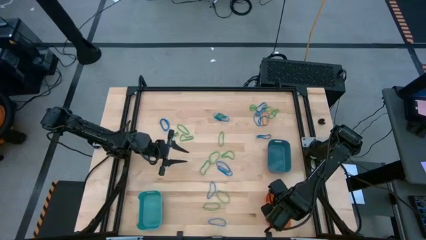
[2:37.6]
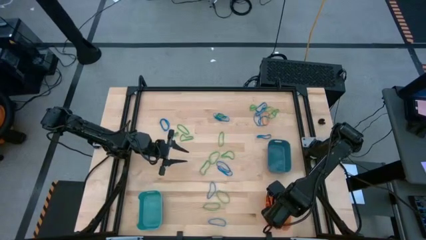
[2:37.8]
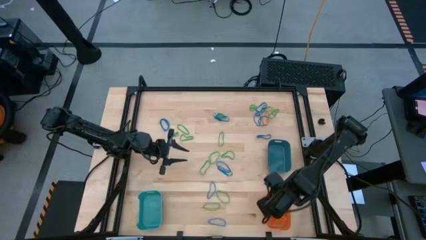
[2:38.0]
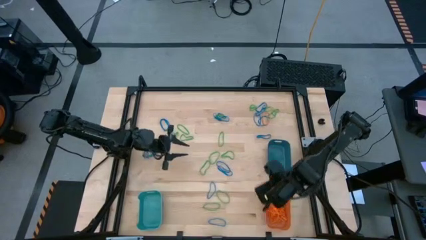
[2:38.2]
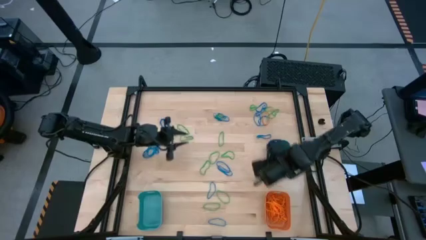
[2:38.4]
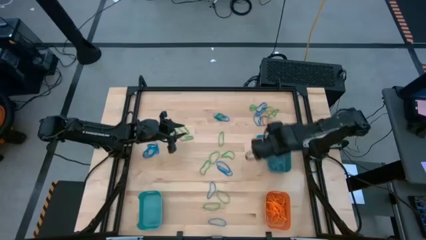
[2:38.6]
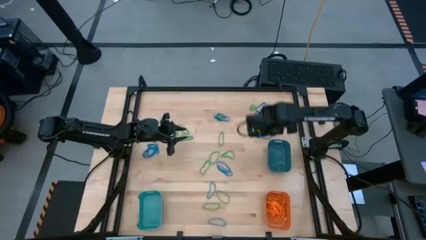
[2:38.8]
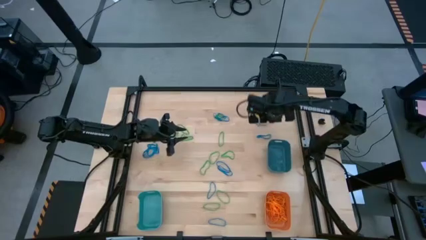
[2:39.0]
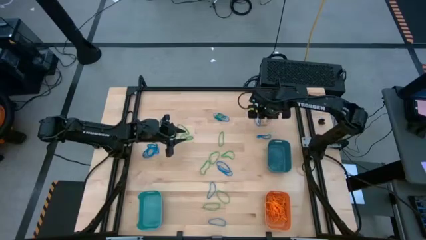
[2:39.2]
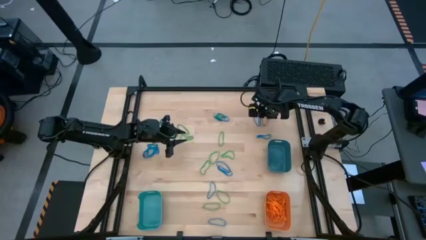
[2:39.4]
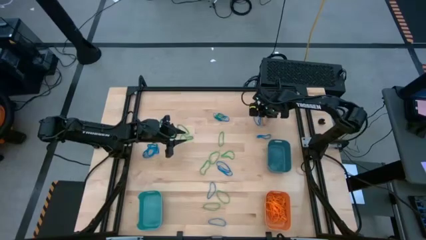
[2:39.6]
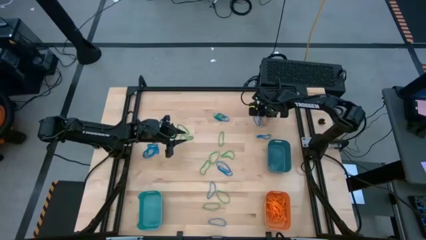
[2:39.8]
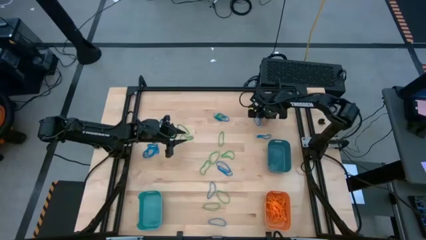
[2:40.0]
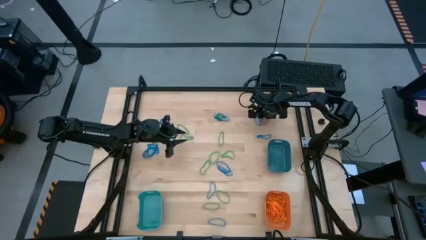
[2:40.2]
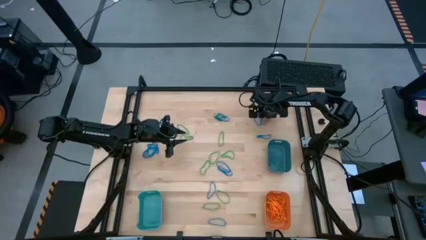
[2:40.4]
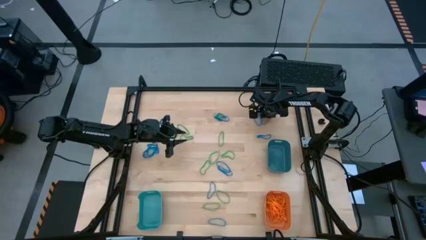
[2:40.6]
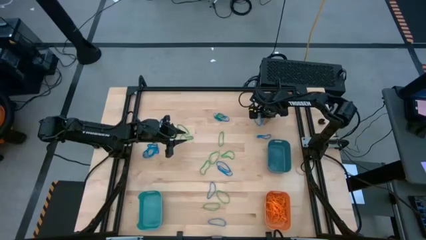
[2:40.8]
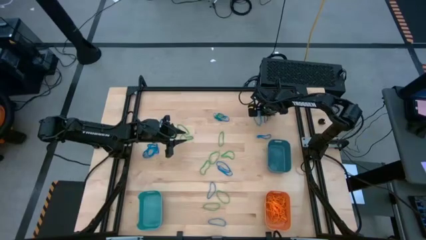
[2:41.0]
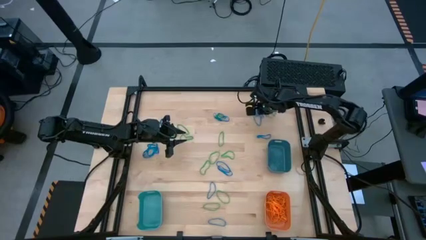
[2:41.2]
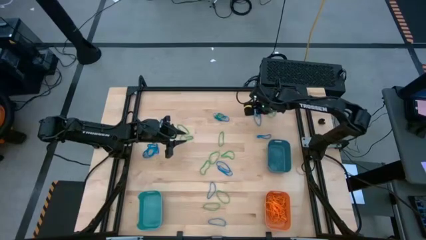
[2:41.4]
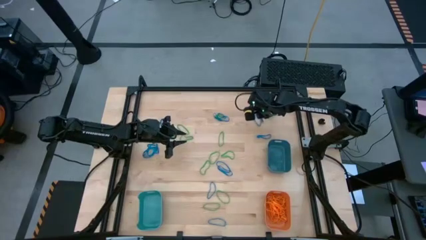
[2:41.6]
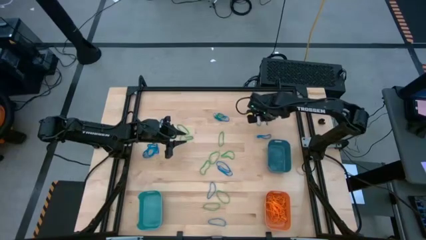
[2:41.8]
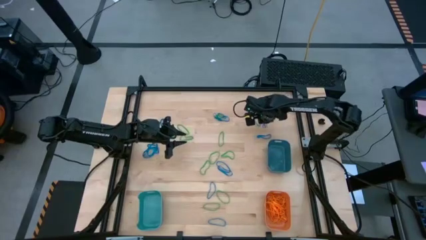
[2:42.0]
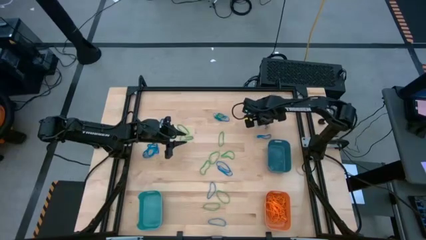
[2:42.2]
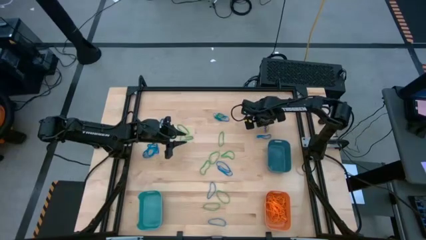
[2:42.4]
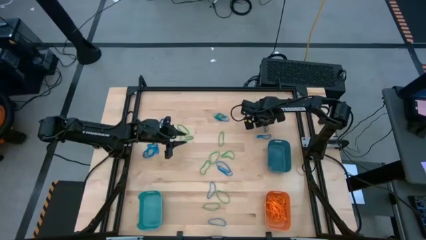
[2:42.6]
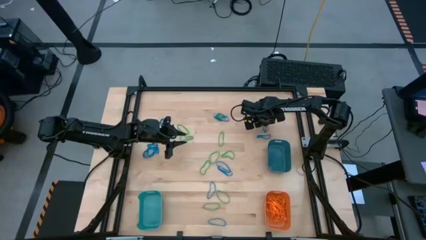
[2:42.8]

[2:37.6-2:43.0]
Task: Sort rubber bands into baskets
Put the orange rubber band into the orange bin

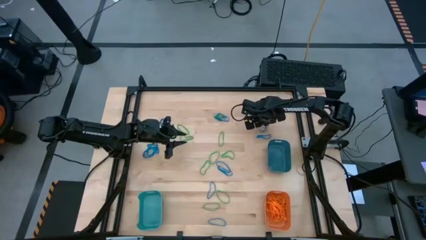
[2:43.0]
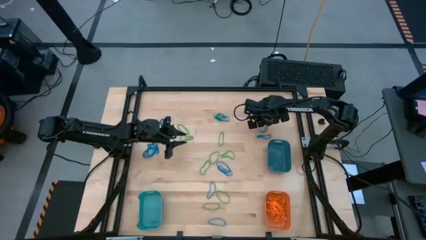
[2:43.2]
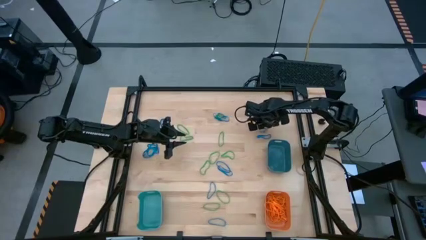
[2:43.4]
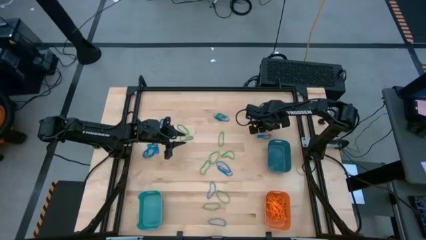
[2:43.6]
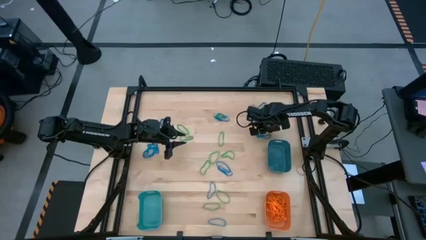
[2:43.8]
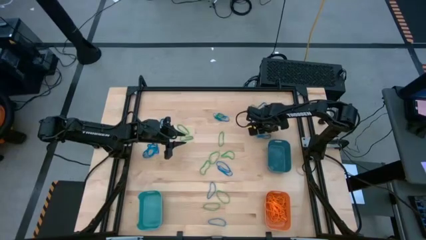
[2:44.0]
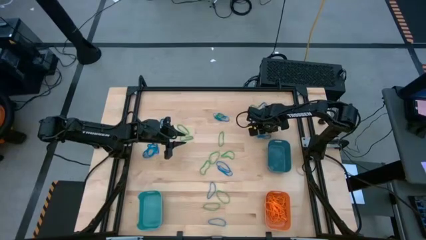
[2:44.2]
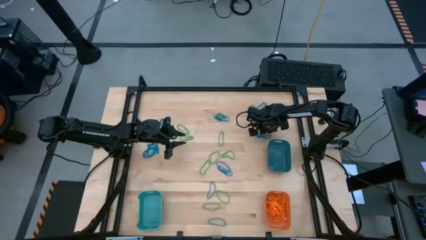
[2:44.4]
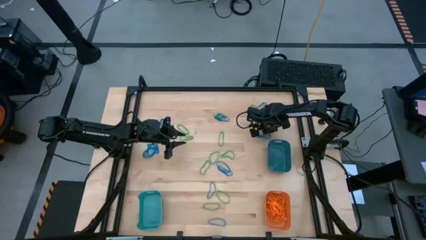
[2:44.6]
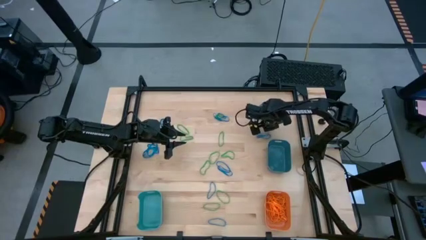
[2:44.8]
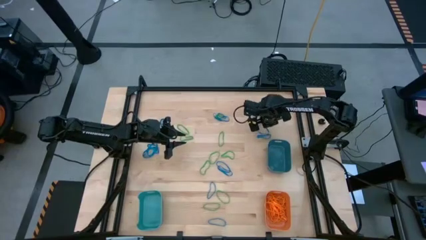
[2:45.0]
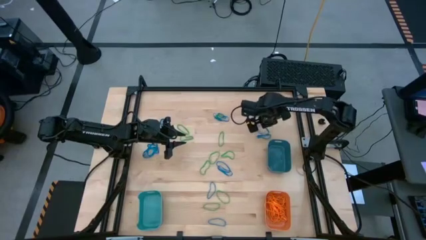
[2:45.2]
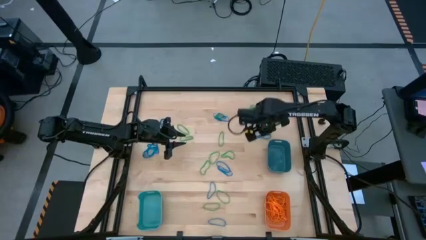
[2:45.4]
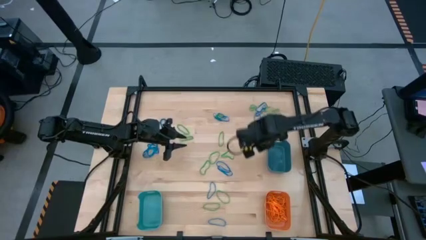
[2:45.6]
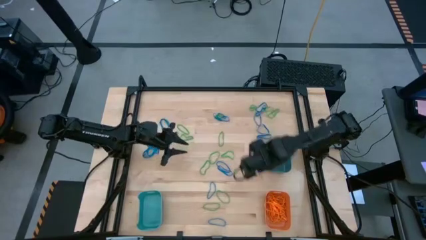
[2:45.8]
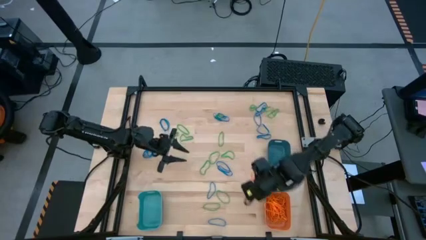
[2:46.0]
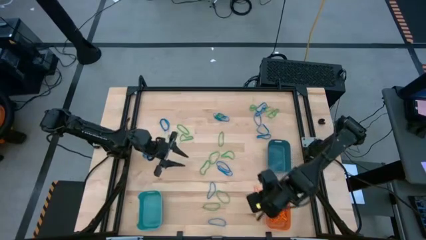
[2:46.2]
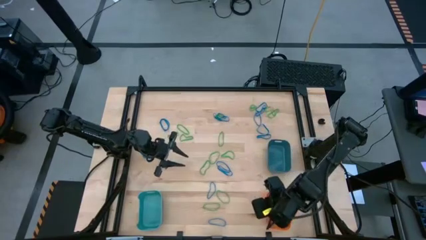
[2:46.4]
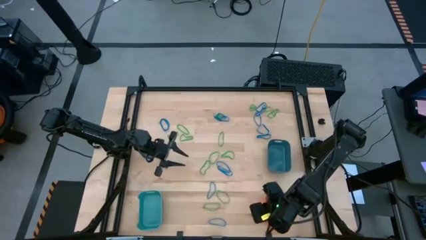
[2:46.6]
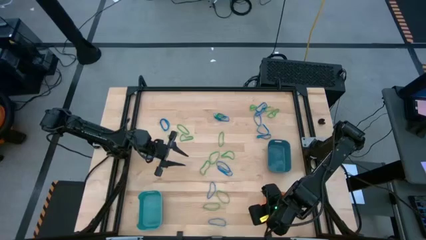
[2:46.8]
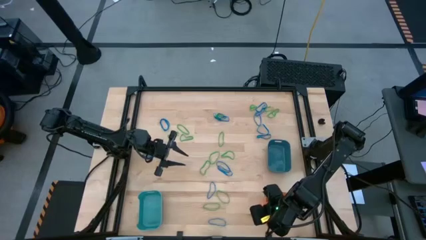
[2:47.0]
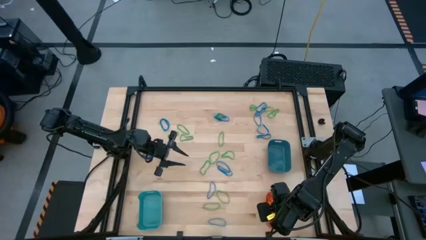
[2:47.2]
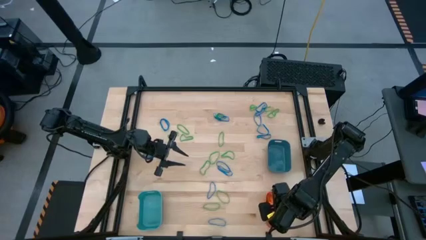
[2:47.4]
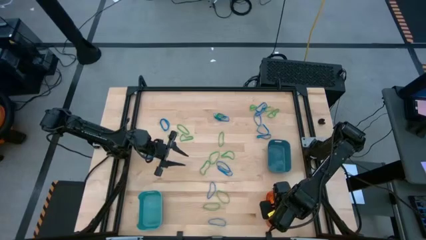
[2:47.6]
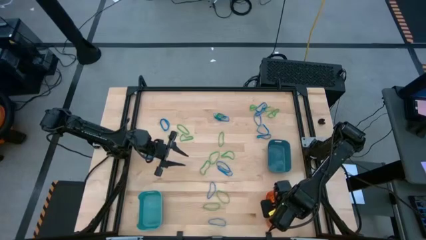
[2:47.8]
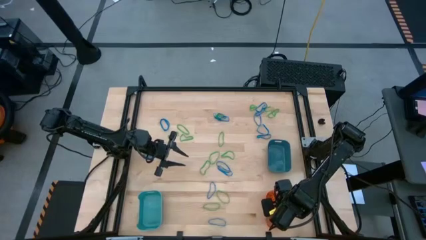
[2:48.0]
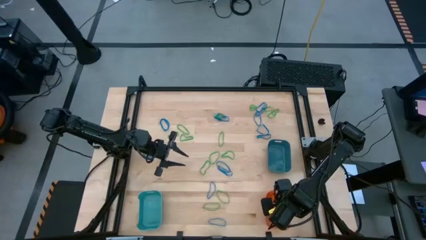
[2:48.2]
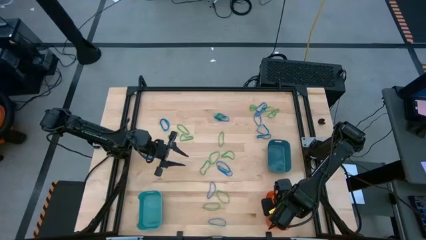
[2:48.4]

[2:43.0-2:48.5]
Put the orange rubber band into the orange bin

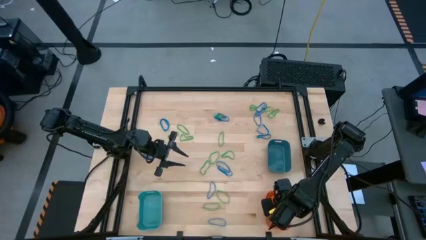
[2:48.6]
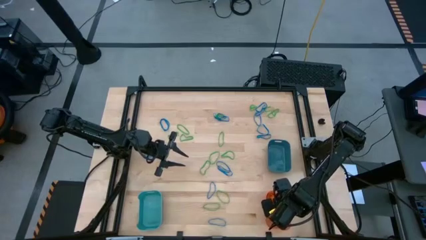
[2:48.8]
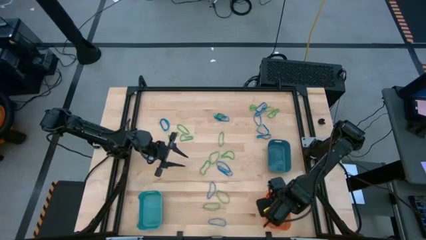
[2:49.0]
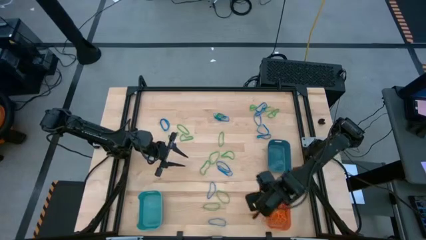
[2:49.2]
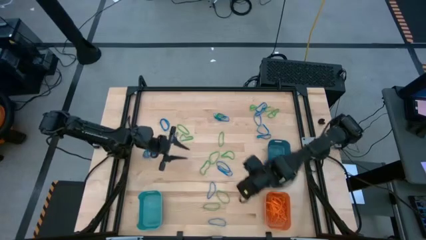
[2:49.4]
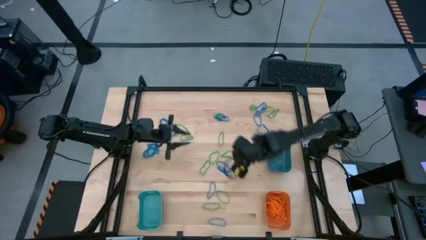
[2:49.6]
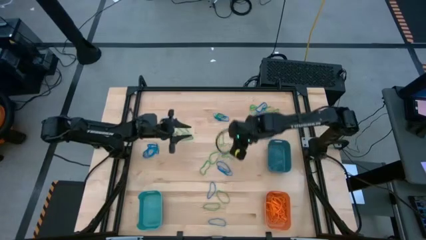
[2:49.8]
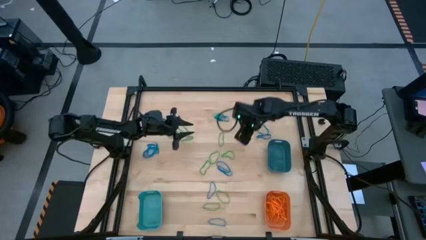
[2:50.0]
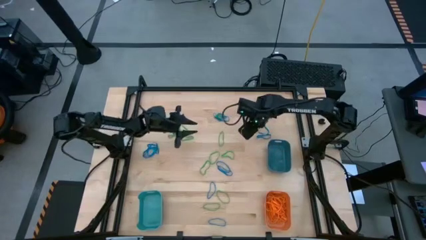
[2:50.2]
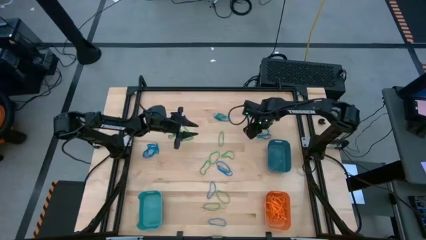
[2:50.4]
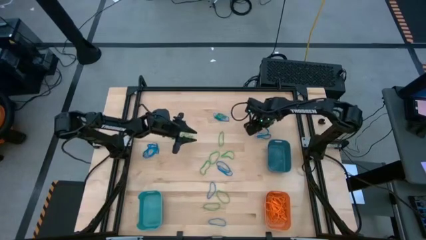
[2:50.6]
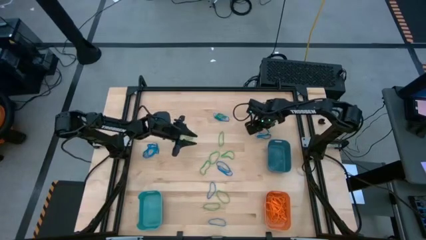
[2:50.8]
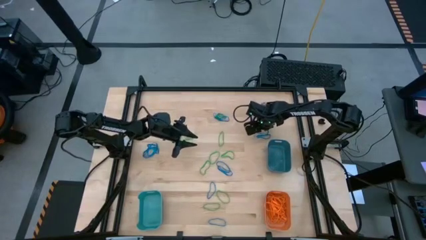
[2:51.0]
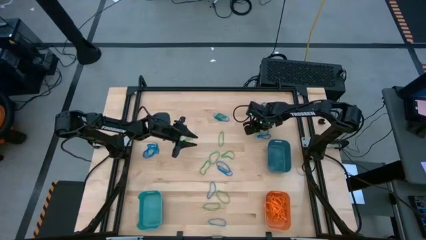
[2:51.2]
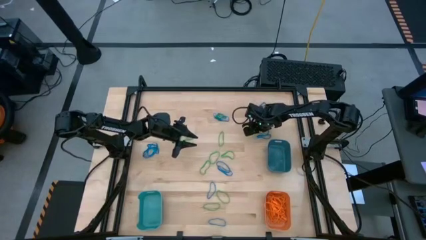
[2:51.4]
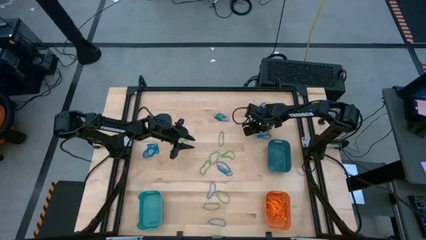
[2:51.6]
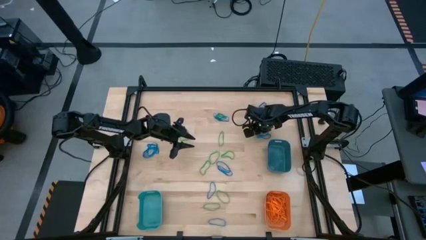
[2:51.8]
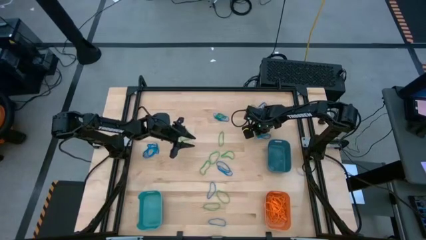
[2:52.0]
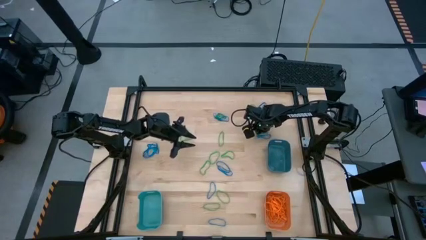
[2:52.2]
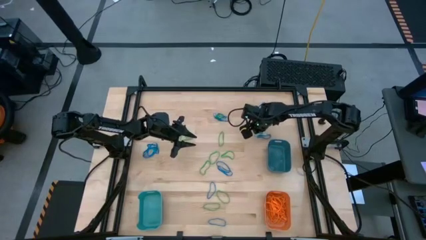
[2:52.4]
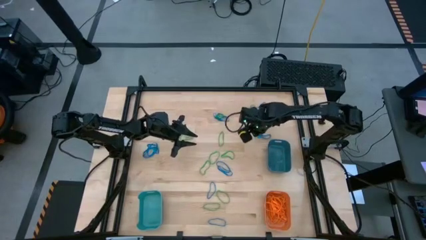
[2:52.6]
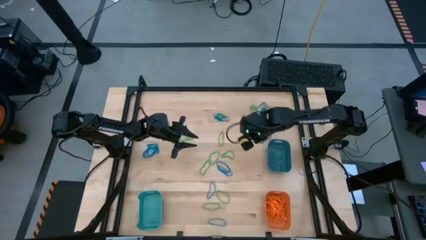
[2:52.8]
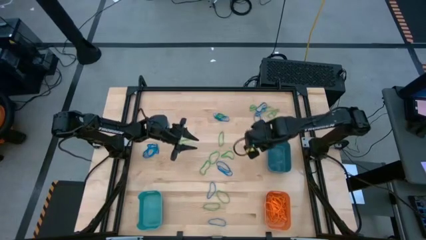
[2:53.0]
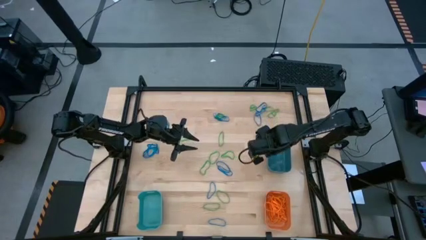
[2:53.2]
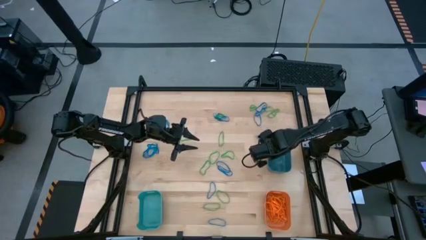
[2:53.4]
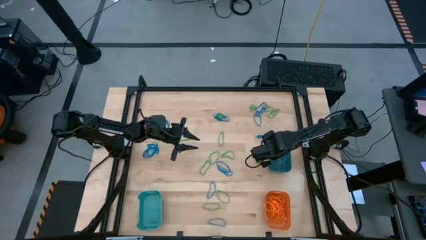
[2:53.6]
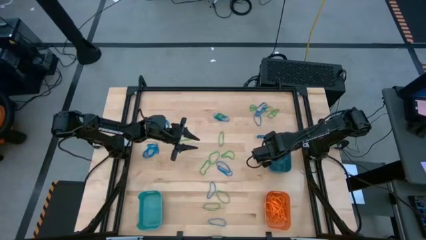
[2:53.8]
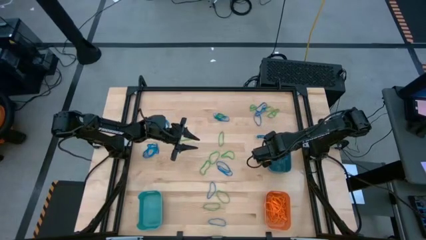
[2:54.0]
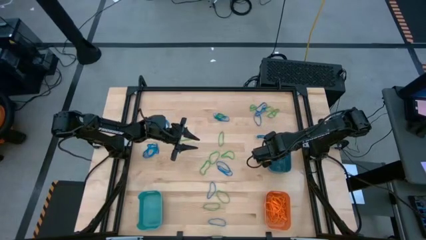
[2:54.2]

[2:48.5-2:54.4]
Put the blue rubber band into the dark blue bin

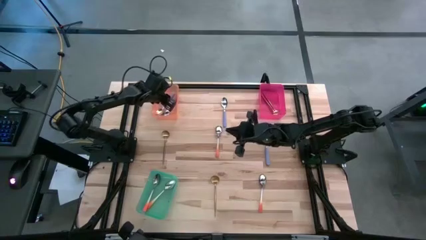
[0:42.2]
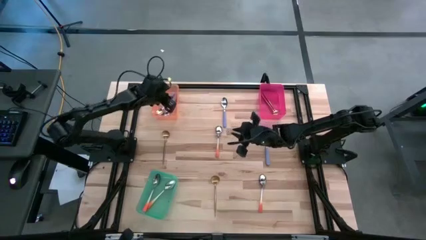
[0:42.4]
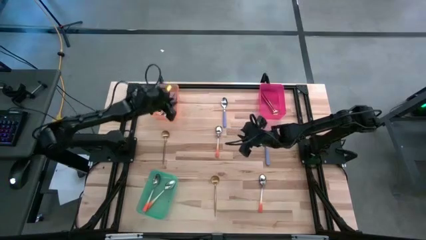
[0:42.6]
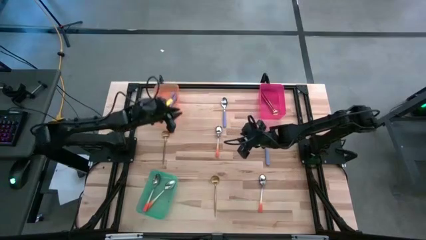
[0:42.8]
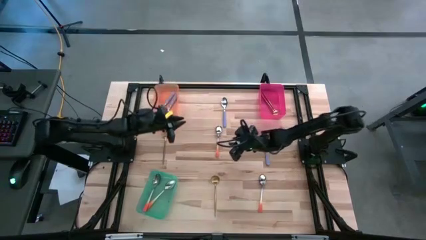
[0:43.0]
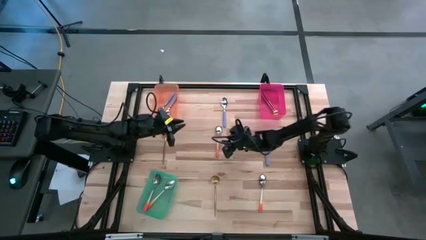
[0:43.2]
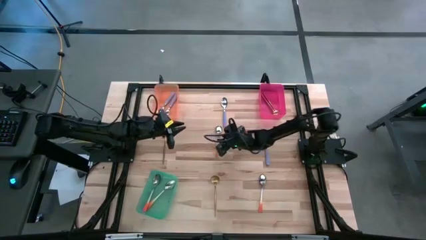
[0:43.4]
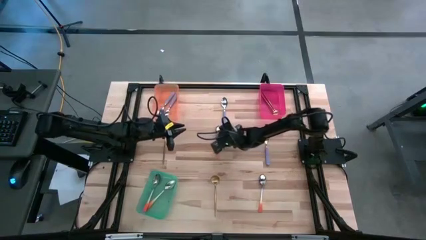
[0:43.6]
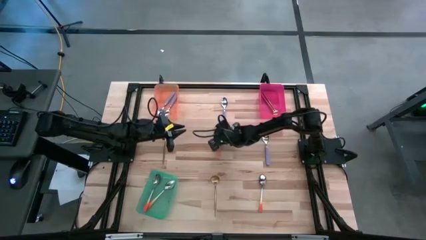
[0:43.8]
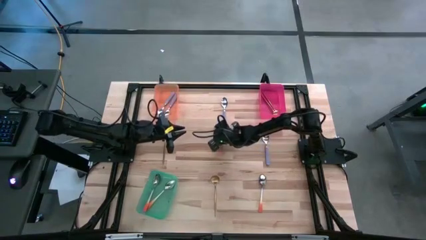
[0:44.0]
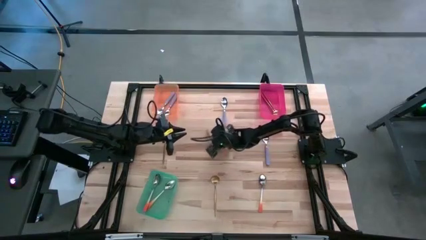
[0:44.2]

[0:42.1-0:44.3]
Task: Sort silverware by color (type)
Put the orange spoon into the green bin
